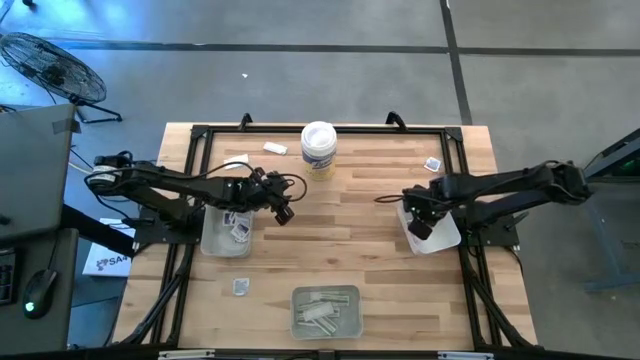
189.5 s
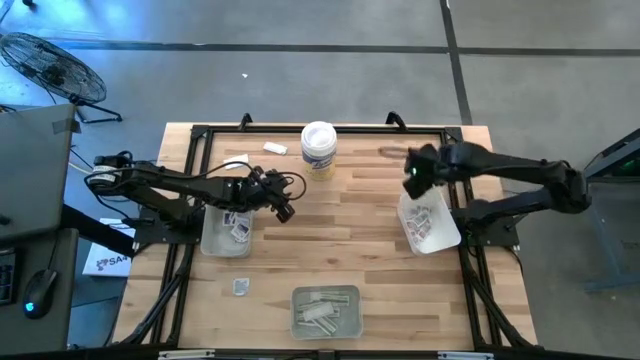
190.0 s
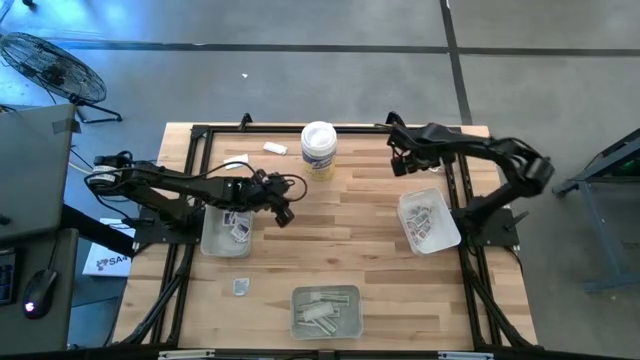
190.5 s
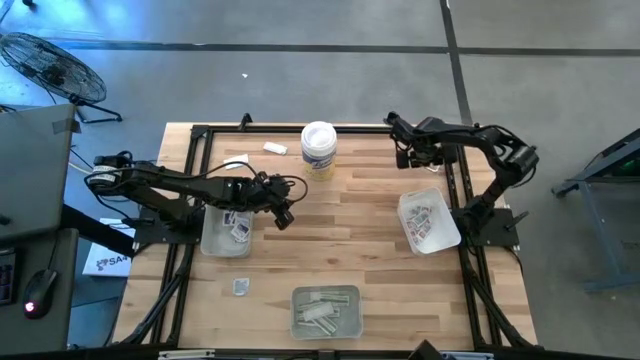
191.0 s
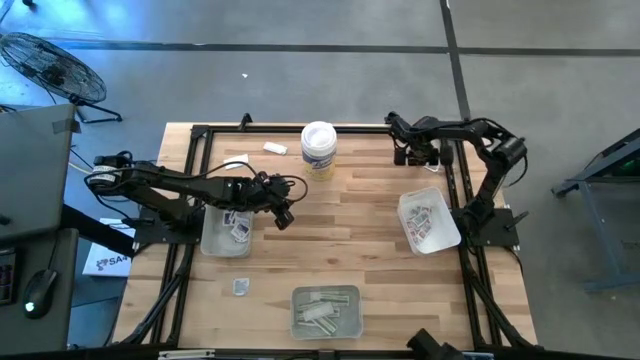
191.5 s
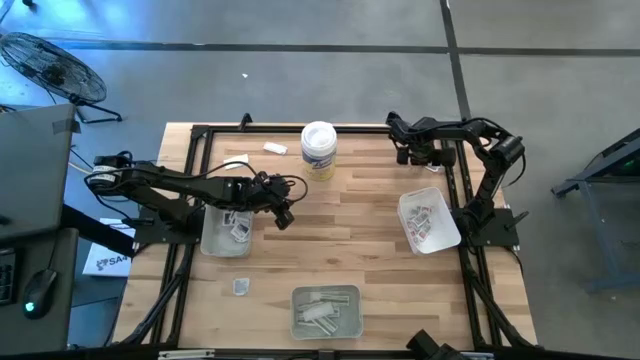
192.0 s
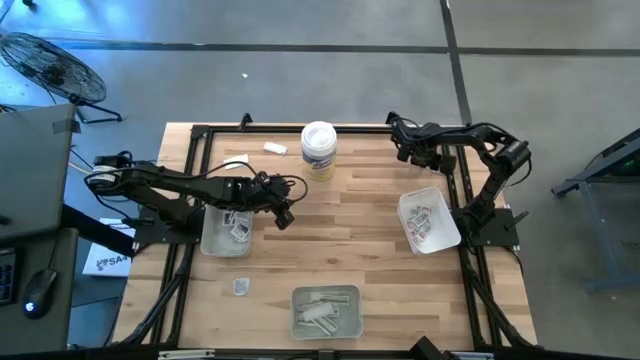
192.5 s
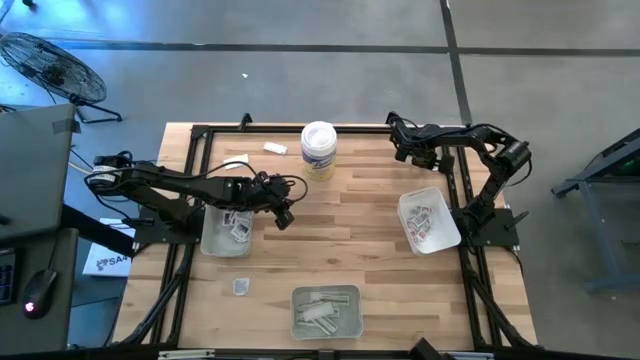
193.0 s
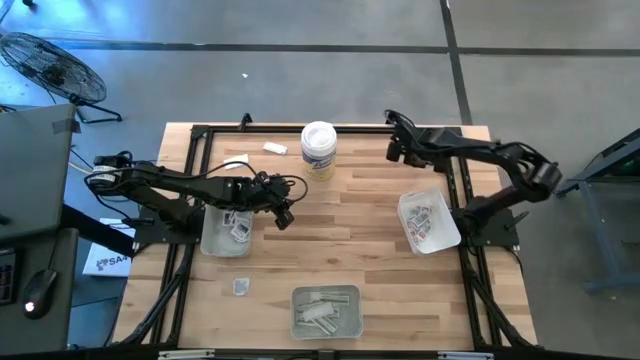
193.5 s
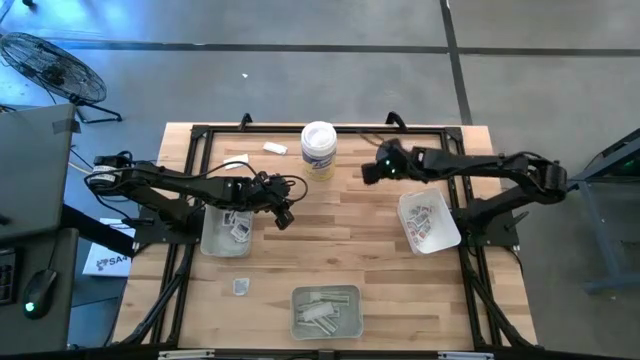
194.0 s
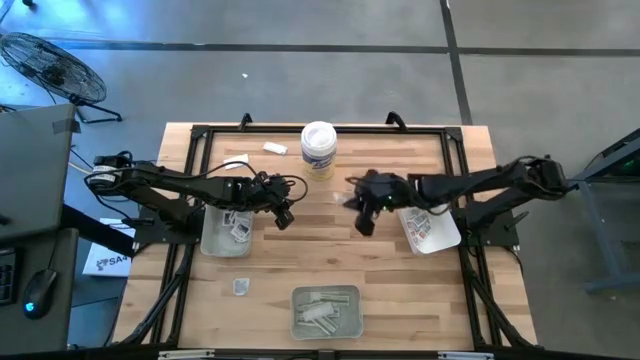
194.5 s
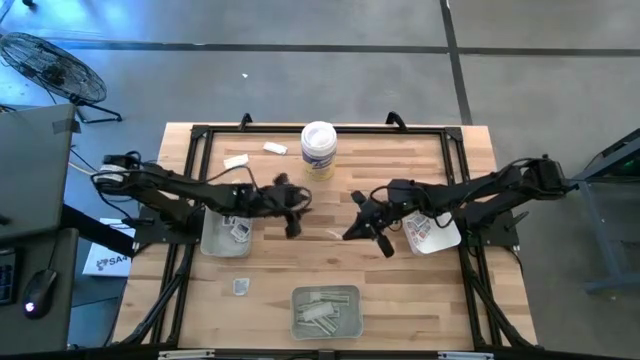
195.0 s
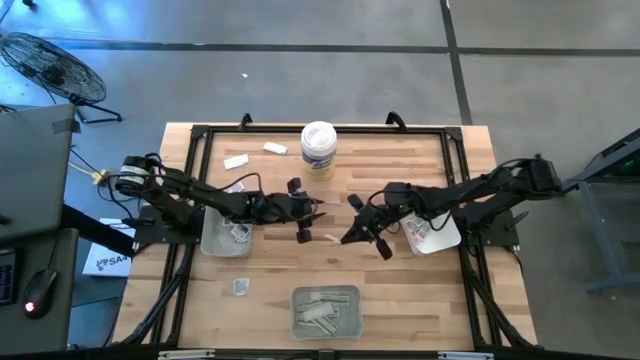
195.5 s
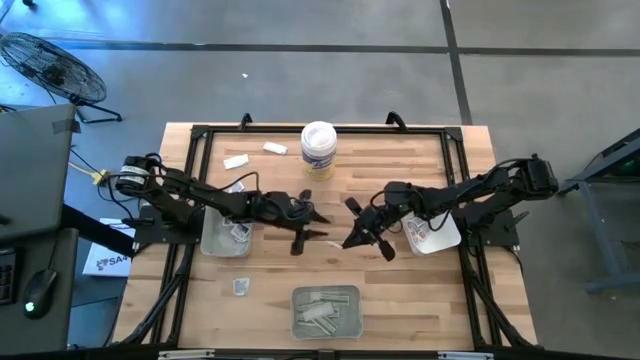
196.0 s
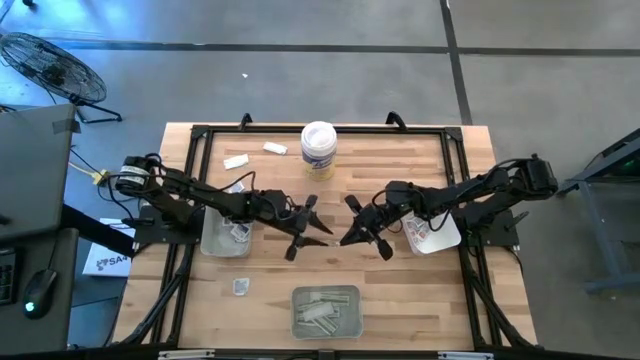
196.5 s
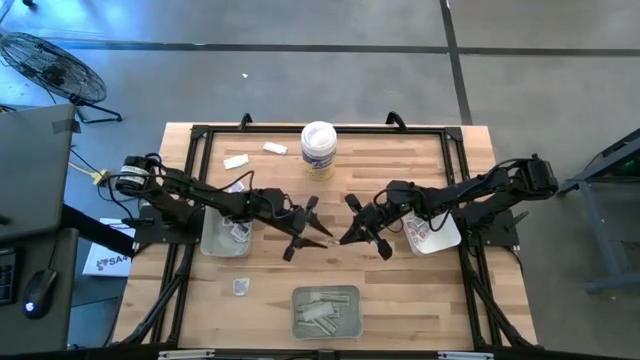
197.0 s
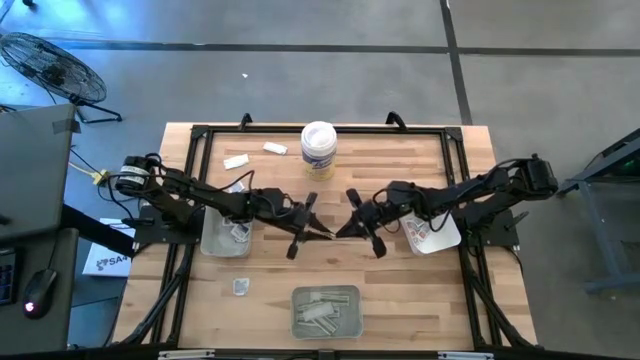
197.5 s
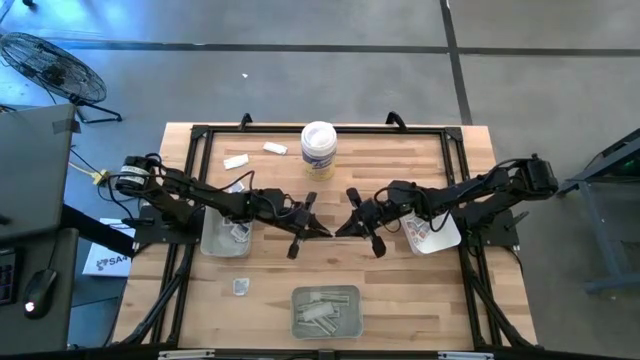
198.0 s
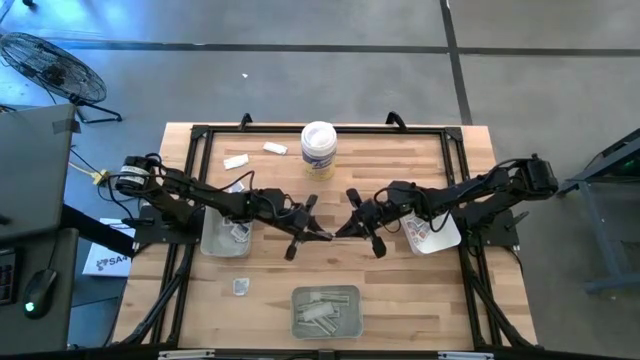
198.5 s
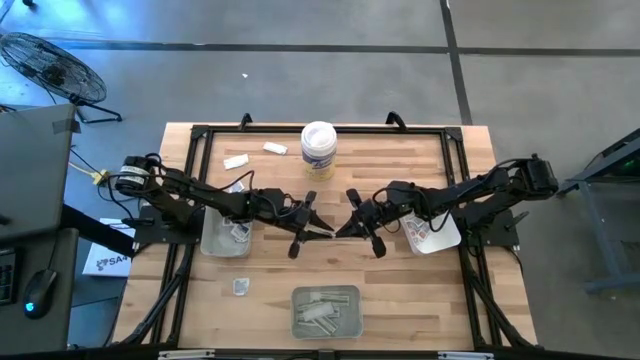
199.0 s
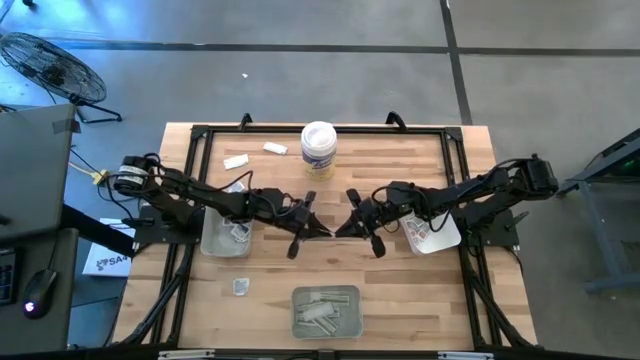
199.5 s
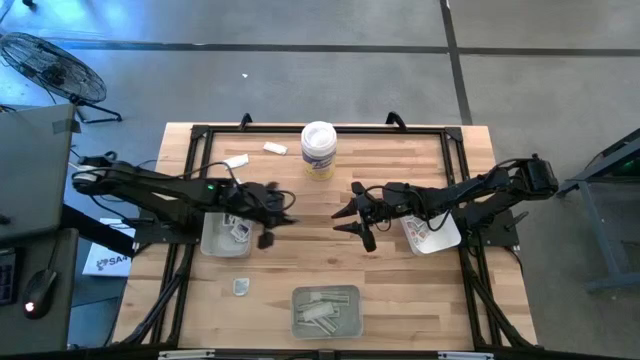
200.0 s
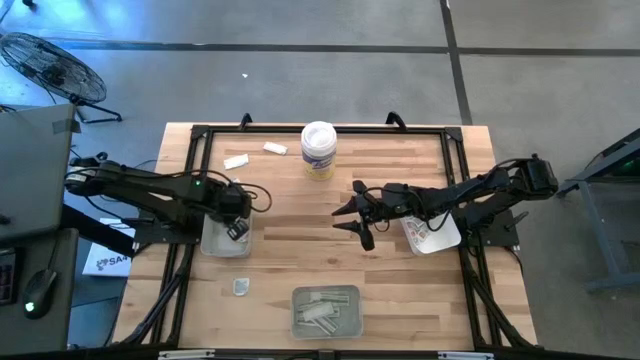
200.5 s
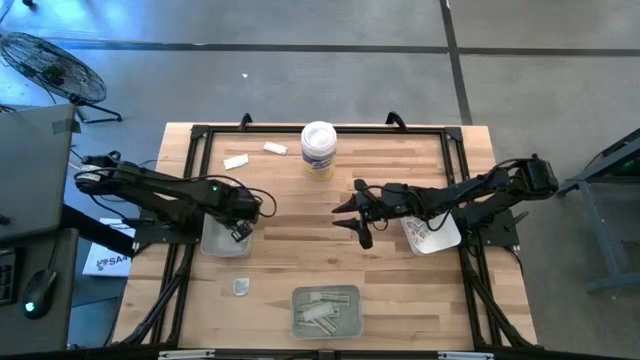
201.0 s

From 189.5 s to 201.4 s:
Task: Pick & Place First Aid Supplies
Put the blue alcohol pad into the top gray bin

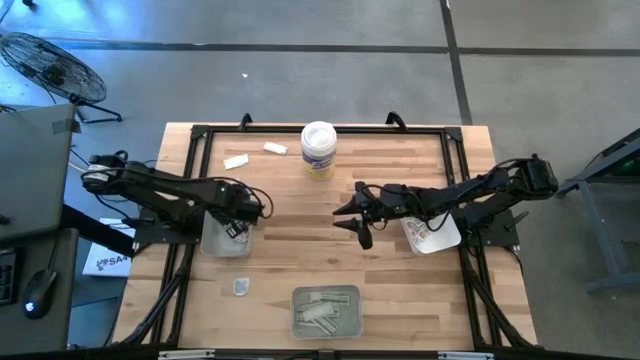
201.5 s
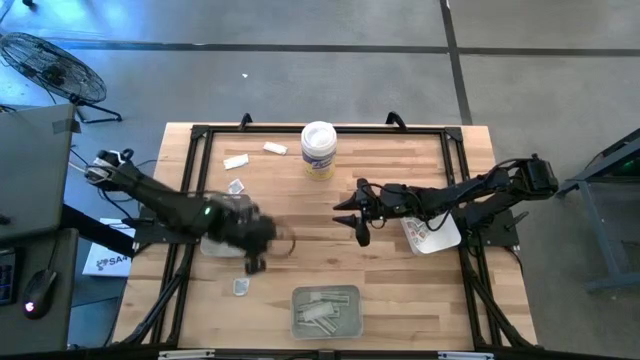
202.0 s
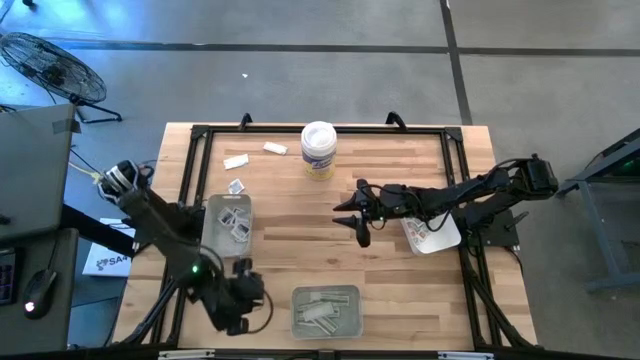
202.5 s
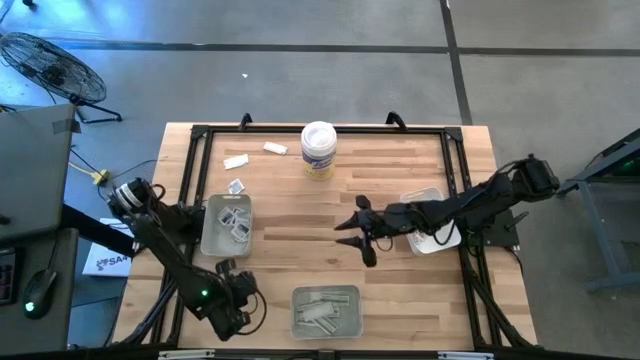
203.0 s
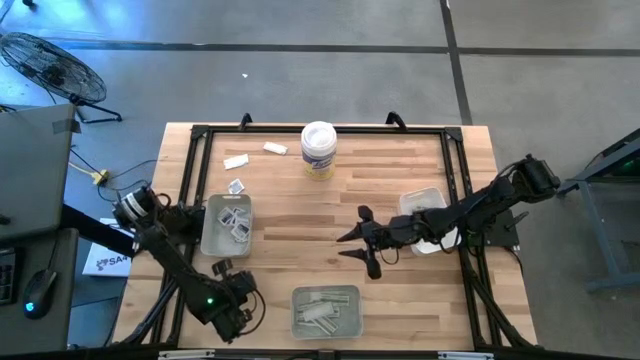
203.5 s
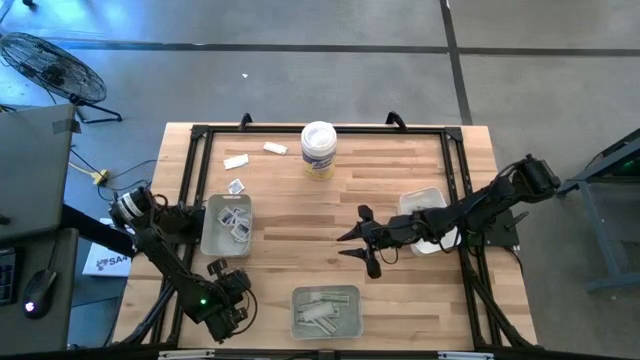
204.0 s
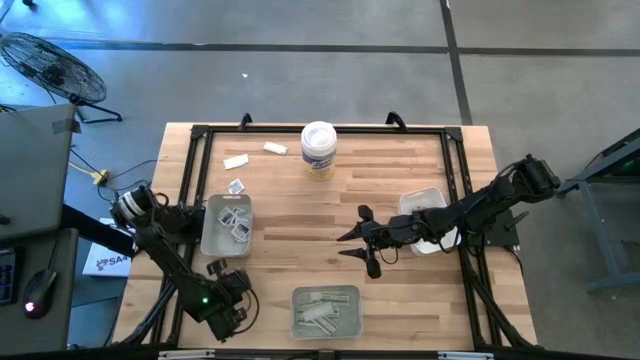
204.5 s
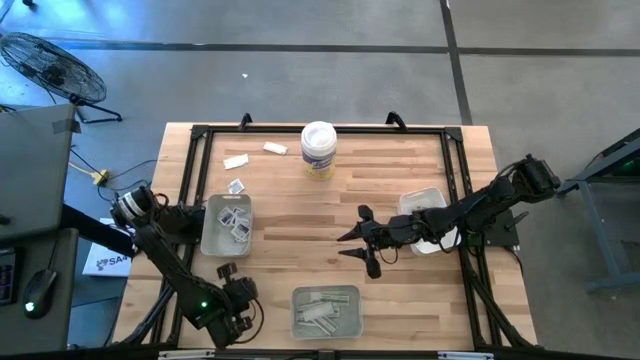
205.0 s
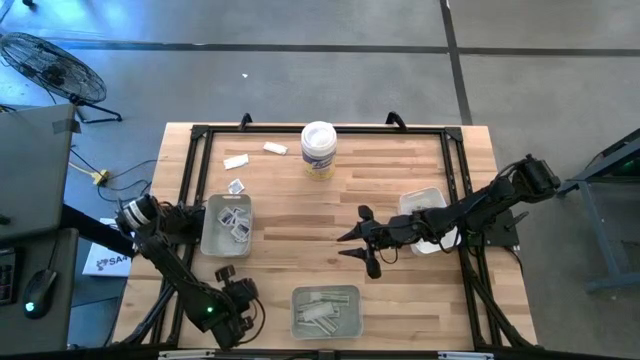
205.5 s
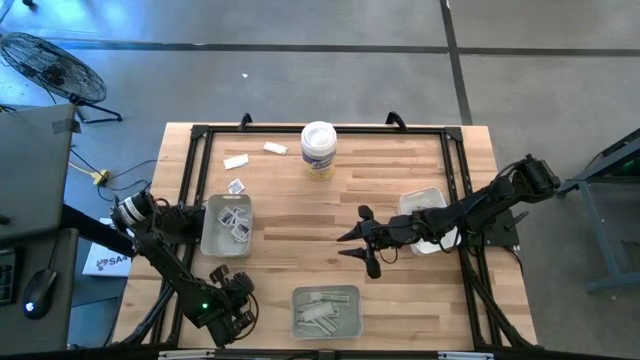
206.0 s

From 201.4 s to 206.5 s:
Put the blue alcohol pad into the top gray bin

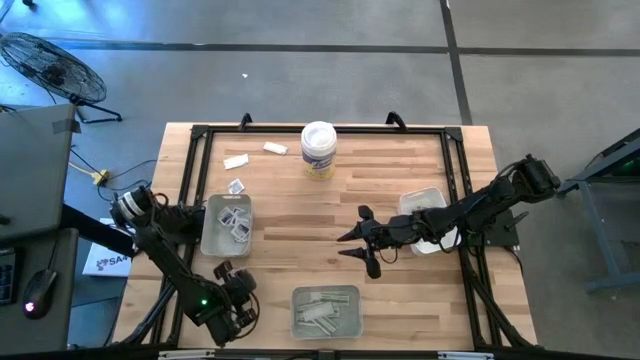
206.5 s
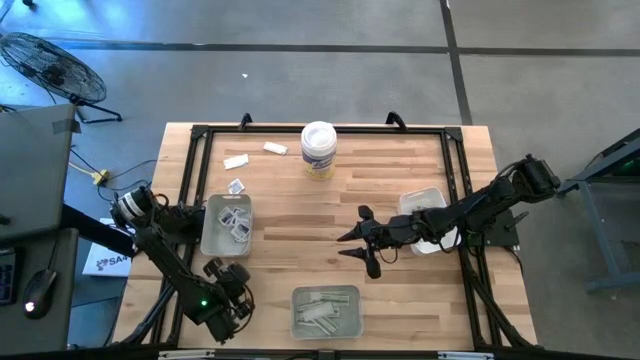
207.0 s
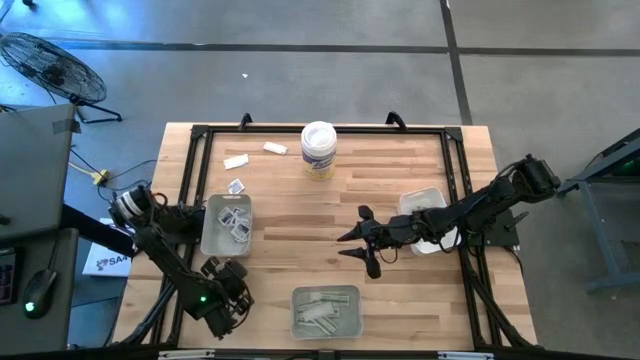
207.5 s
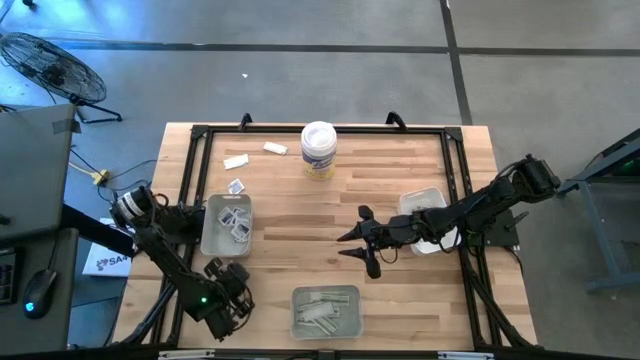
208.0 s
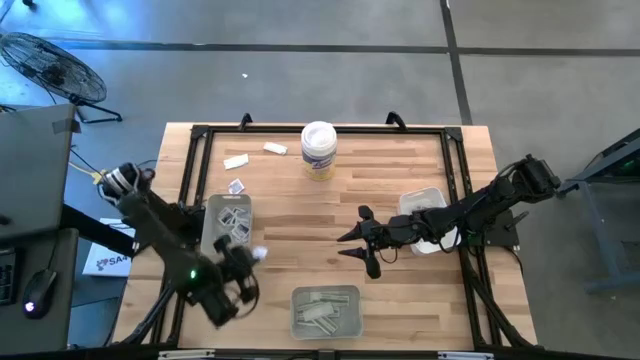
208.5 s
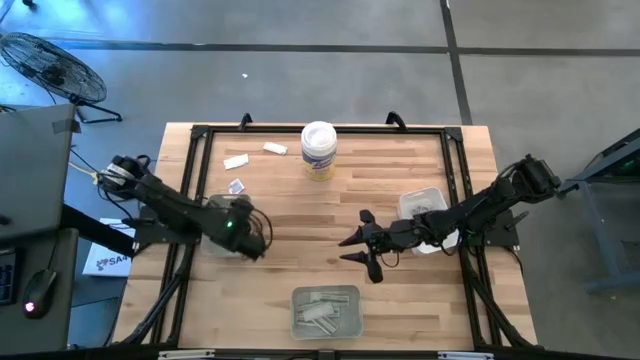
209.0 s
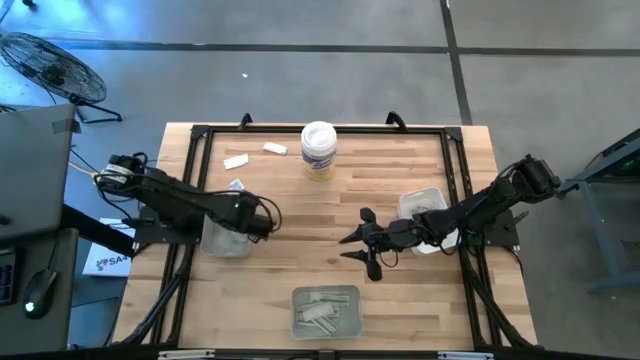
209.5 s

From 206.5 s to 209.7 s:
Put the blue alcohol pad into the top gray bin
